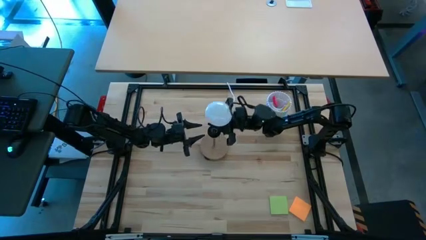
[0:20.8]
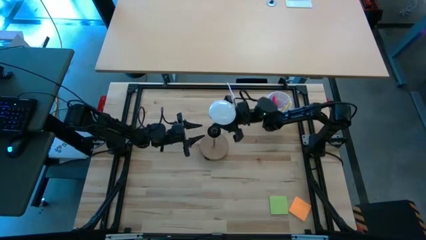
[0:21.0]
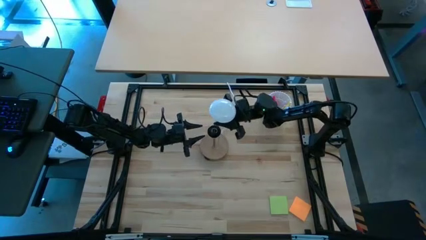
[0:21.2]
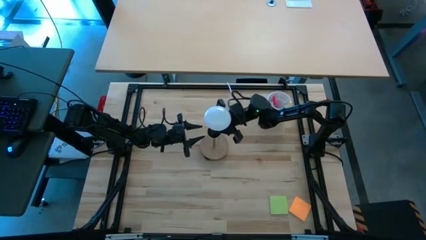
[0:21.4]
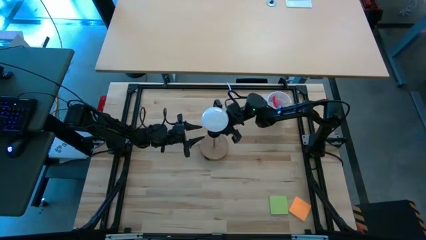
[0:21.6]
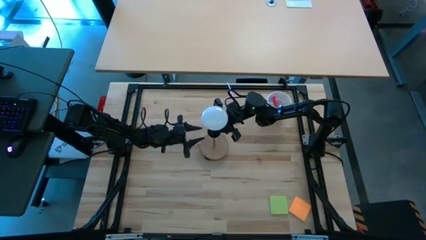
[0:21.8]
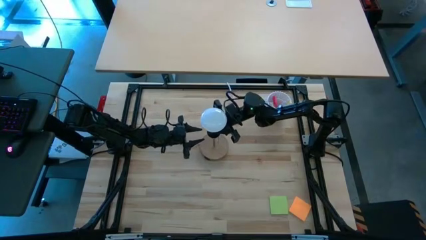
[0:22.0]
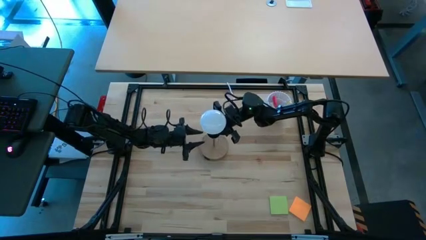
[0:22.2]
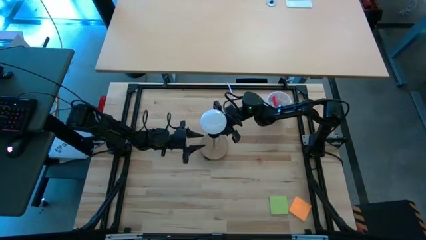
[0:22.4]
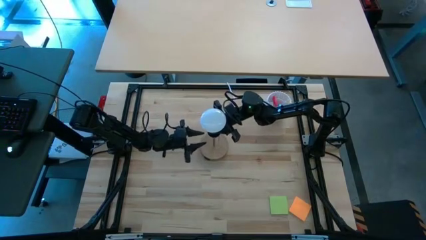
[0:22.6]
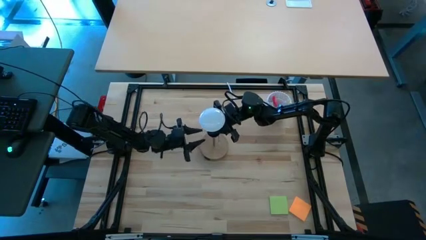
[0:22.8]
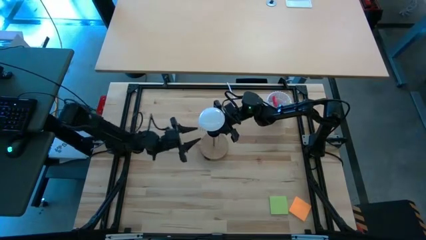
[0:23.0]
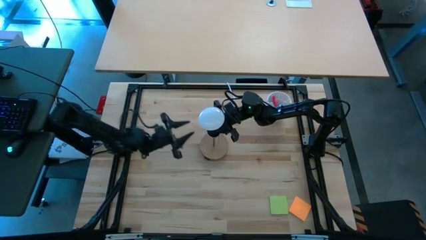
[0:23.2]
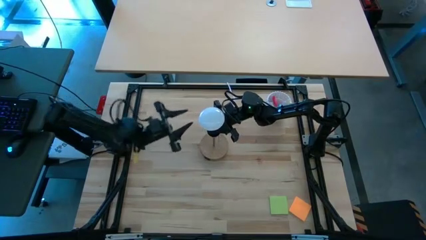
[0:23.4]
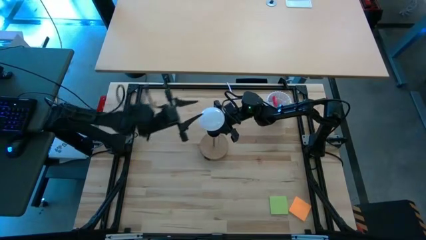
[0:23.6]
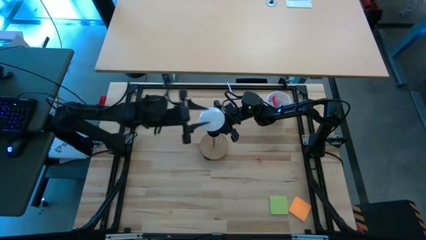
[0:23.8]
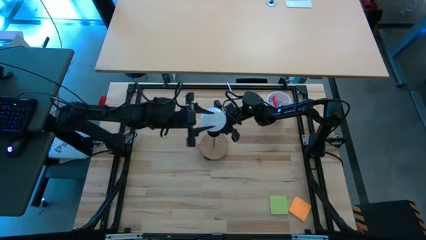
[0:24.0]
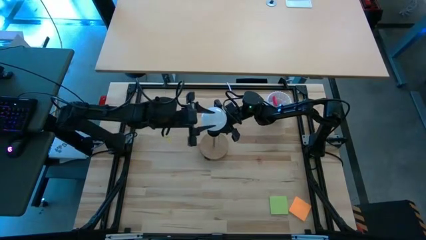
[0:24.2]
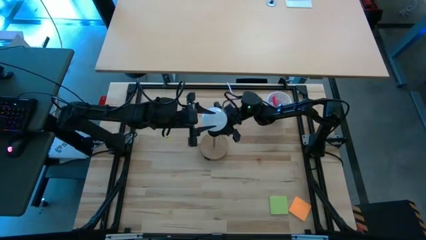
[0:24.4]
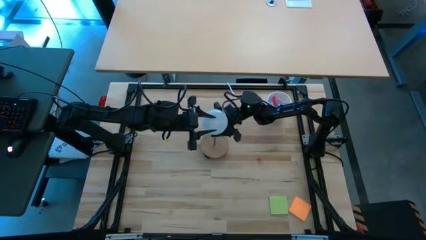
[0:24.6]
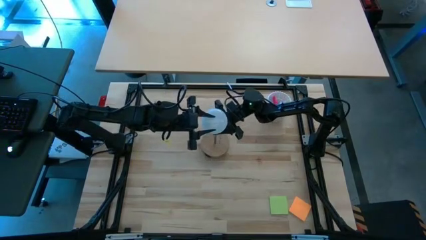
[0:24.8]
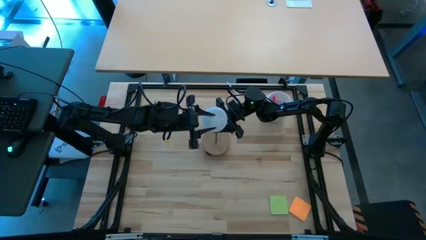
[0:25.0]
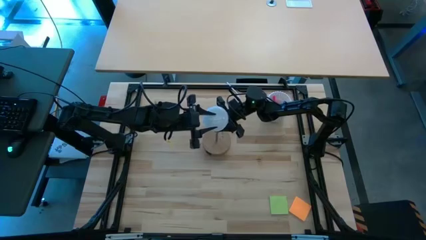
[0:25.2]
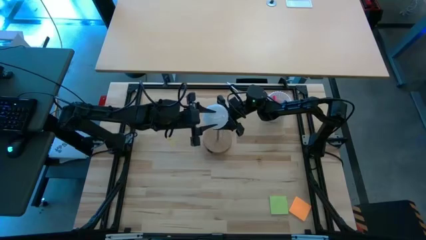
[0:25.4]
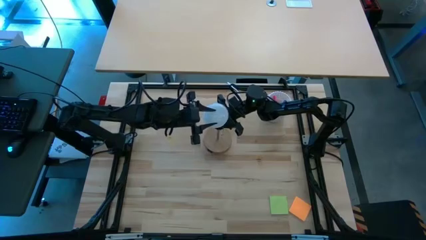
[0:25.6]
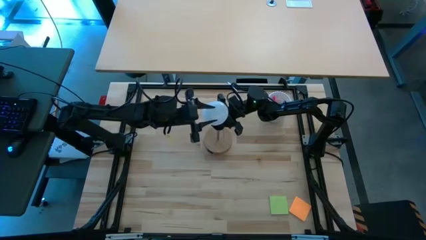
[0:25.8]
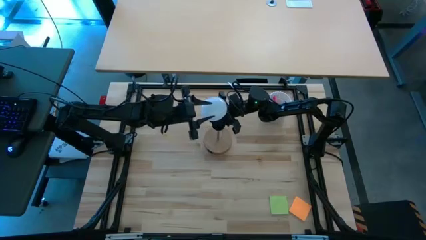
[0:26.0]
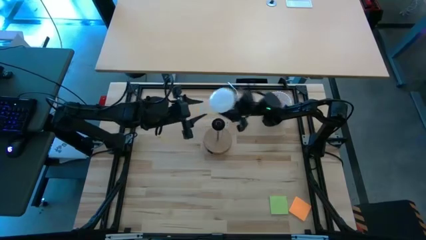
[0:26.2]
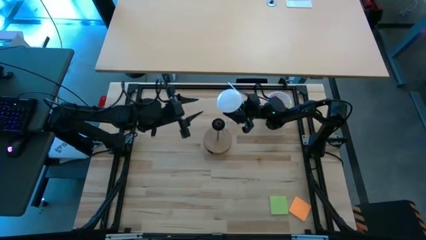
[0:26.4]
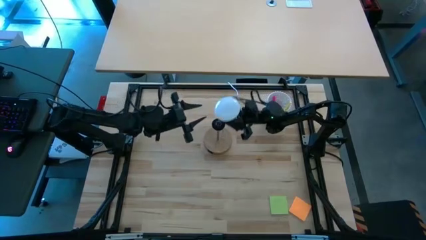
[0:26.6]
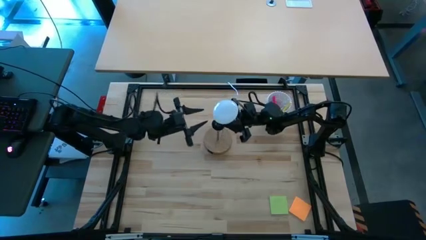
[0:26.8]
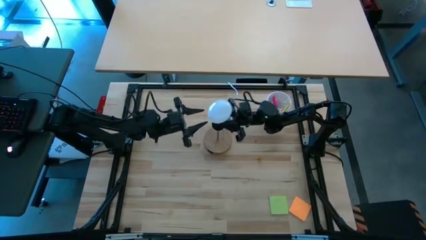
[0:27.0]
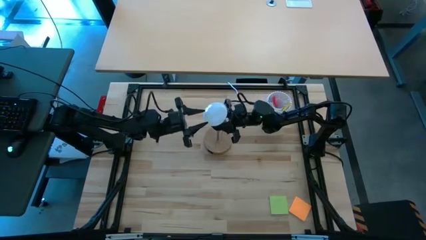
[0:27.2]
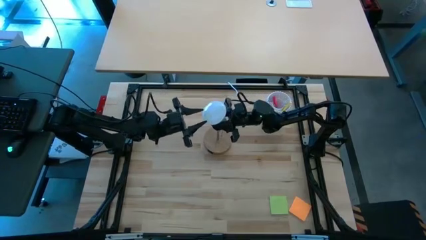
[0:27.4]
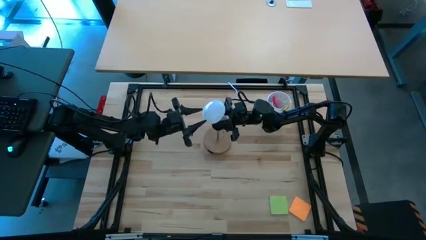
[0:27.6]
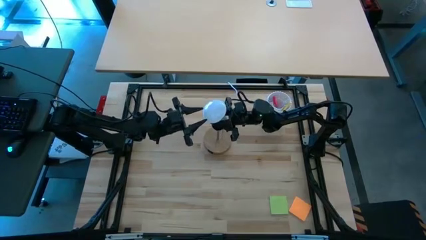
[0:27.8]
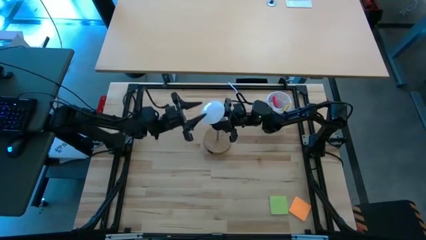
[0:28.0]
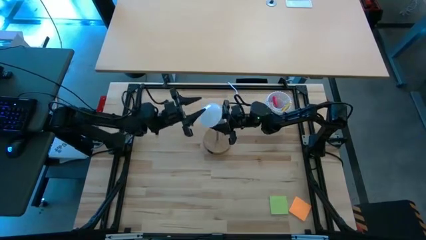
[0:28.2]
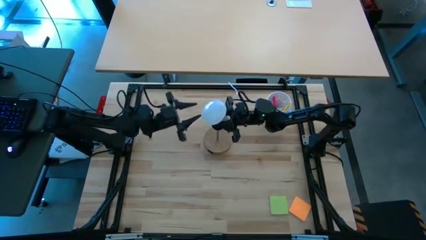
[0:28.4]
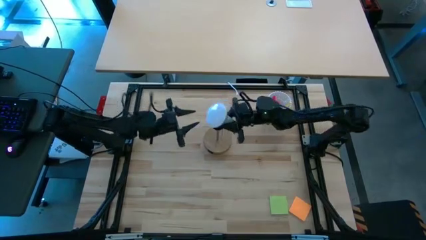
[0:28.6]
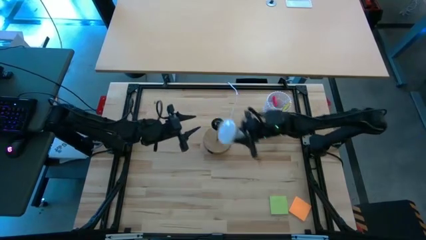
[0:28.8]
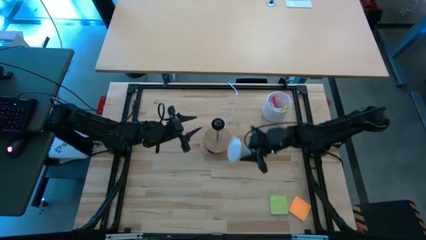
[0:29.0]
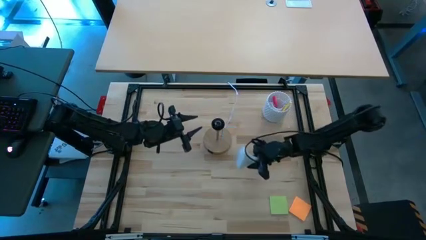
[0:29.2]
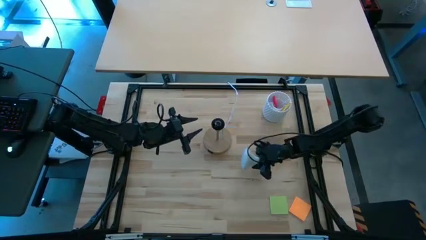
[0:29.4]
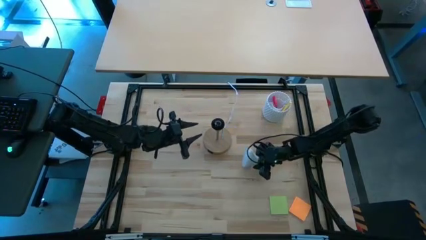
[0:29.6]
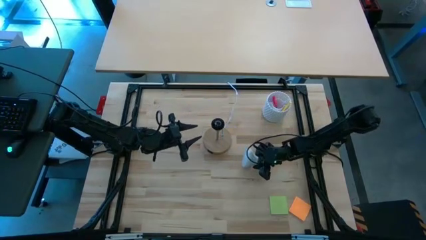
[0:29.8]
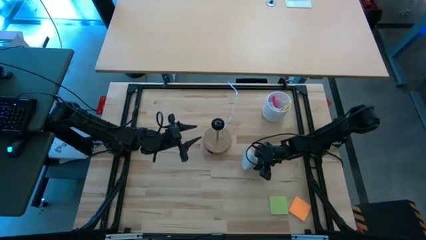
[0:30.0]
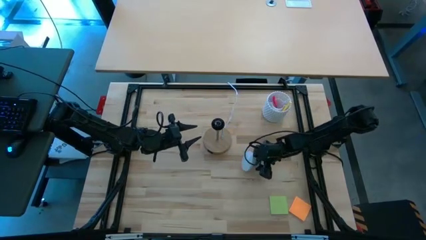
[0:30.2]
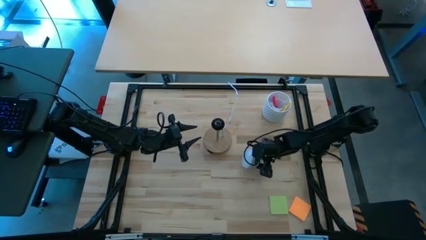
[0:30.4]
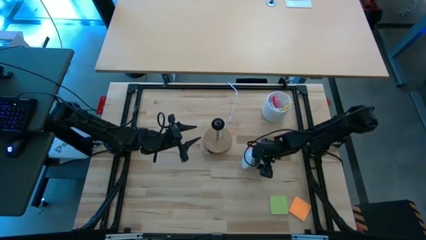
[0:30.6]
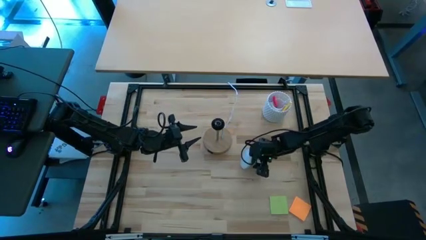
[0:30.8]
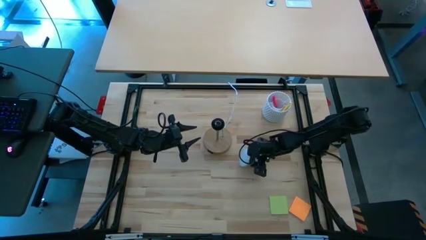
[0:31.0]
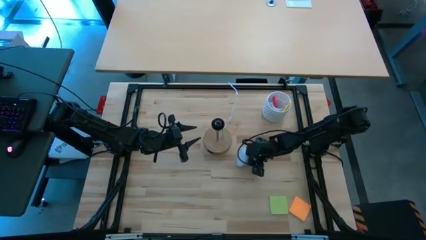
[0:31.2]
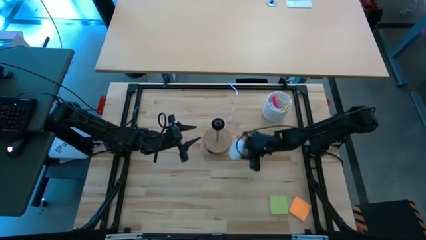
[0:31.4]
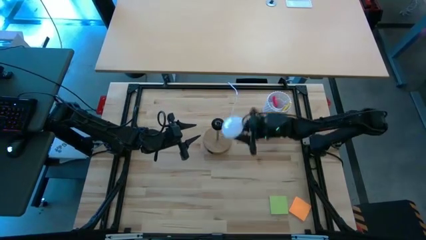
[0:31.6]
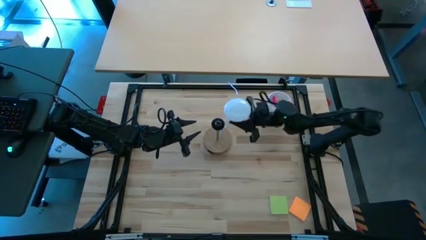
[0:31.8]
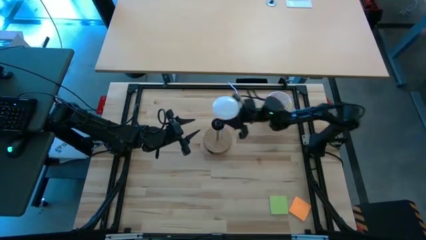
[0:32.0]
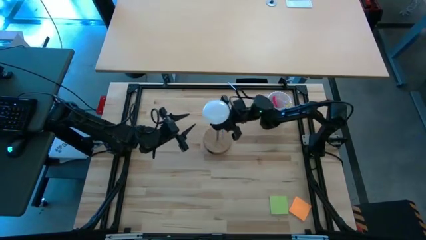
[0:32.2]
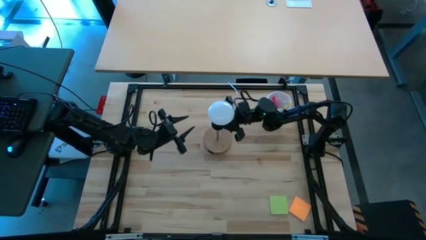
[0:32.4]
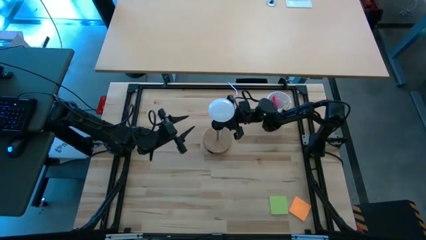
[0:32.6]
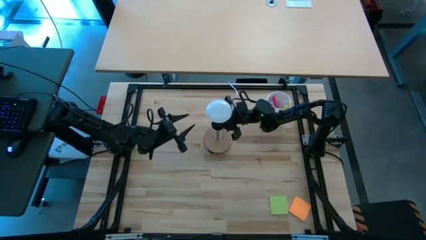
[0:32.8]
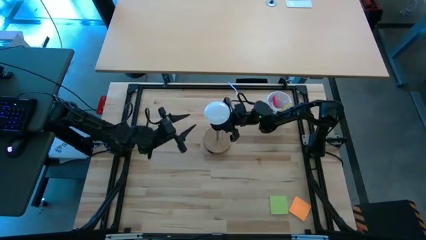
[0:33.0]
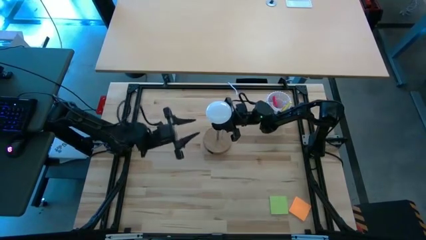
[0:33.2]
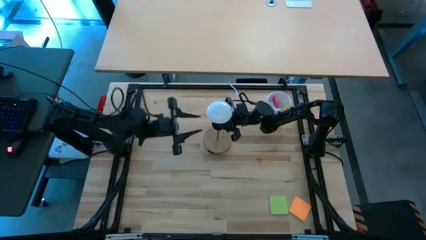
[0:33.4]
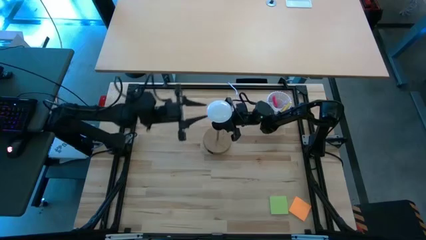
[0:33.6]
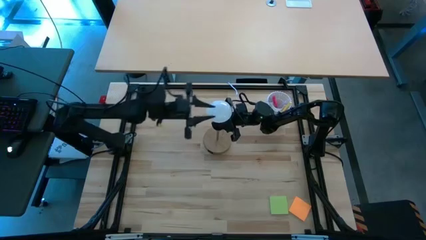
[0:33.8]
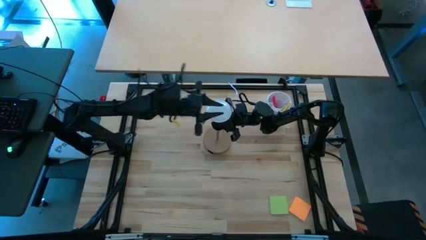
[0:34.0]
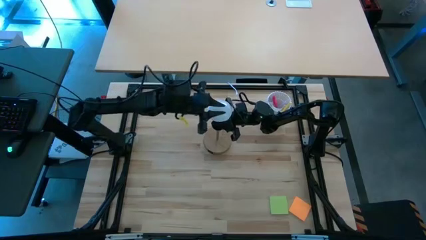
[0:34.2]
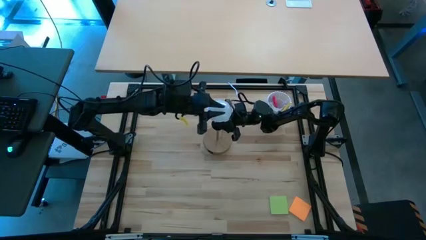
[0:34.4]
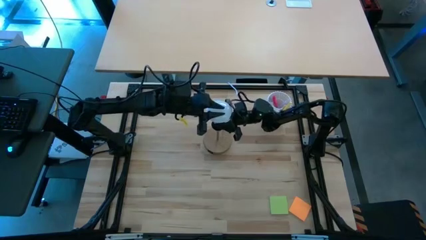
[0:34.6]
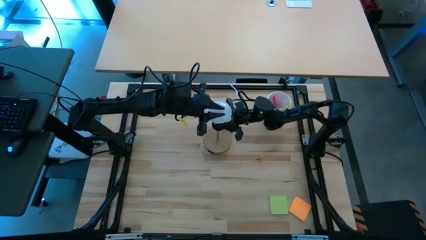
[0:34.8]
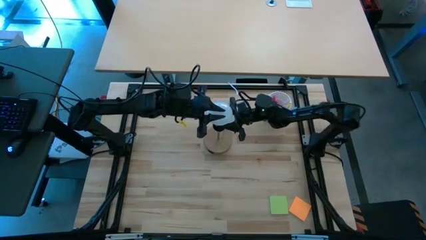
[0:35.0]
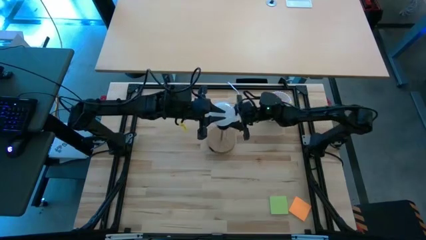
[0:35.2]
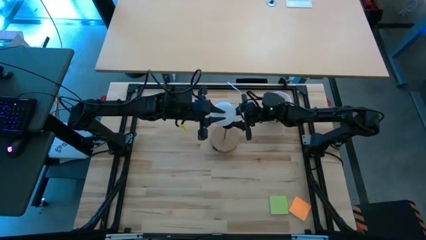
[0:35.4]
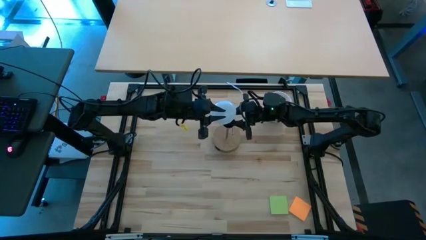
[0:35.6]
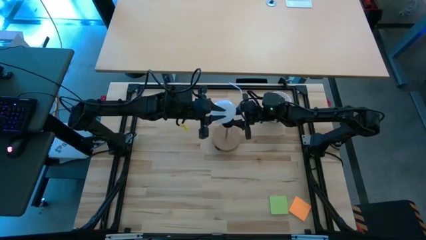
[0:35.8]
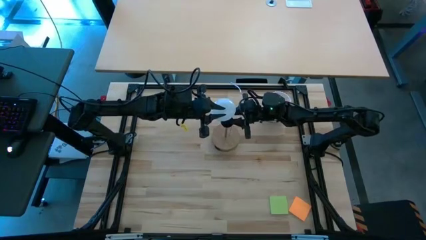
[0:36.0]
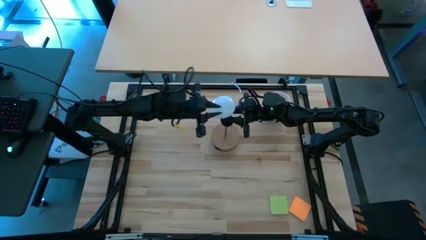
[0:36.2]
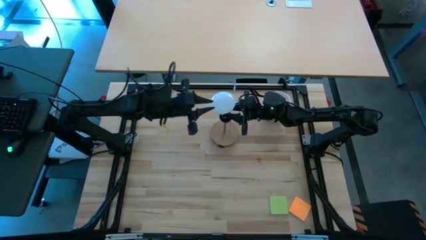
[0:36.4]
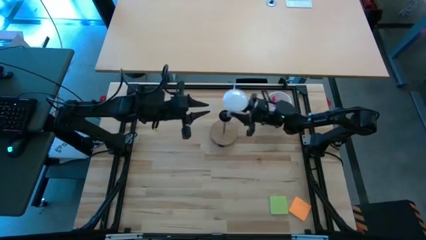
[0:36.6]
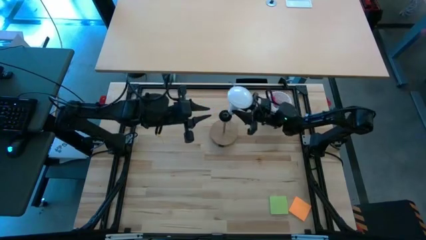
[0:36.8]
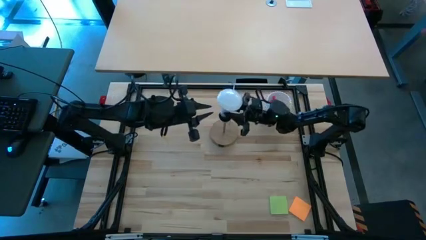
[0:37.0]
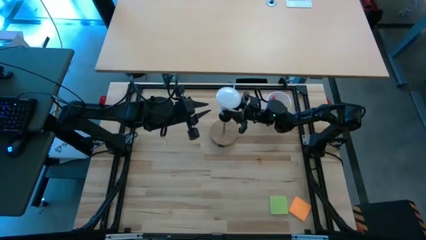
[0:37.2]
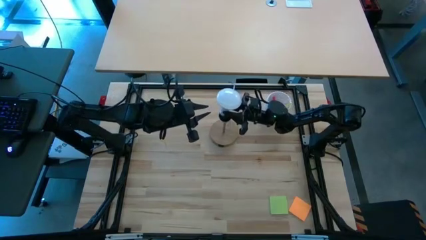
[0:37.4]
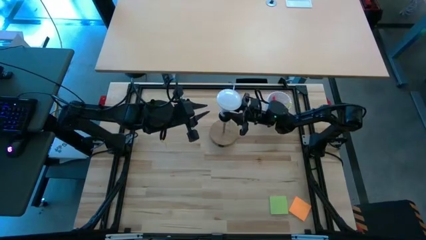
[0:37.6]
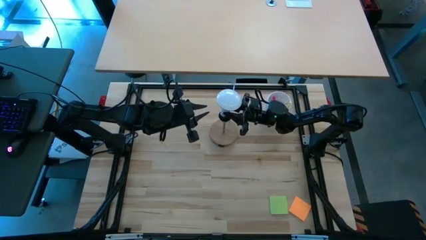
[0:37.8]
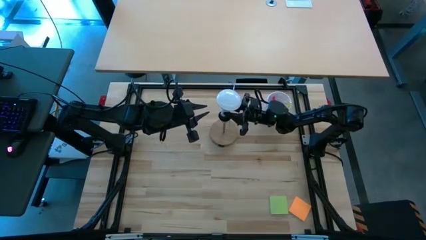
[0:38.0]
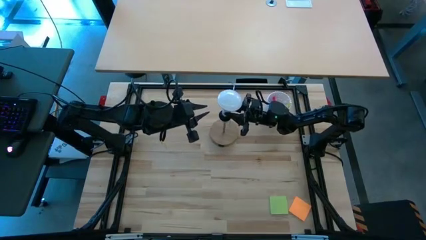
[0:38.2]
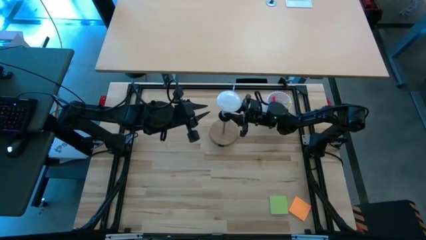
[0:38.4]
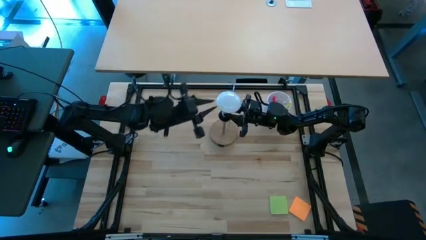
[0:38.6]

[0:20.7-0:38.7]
Task: Screw lightbulb
Insert the white lightbulb into the desk lamp
